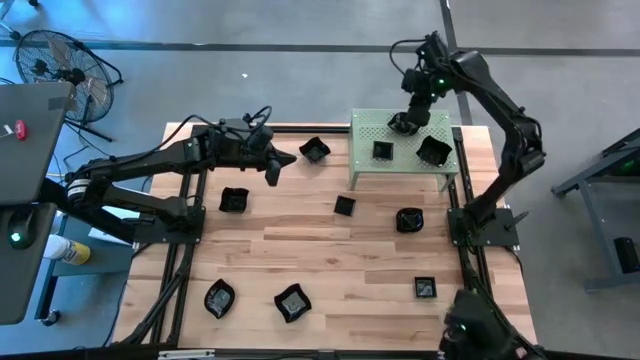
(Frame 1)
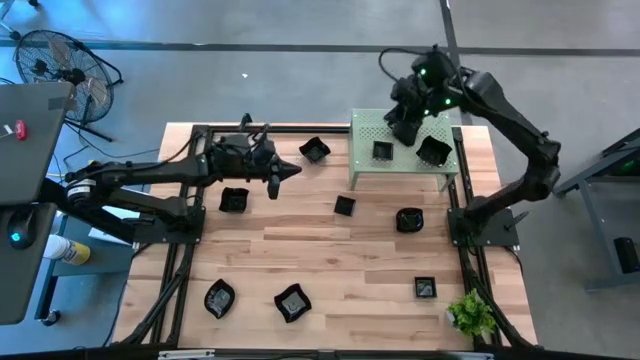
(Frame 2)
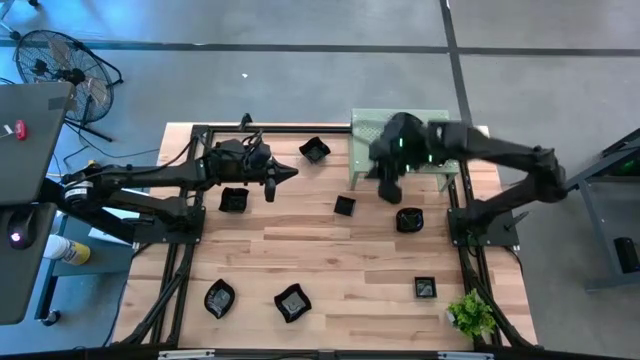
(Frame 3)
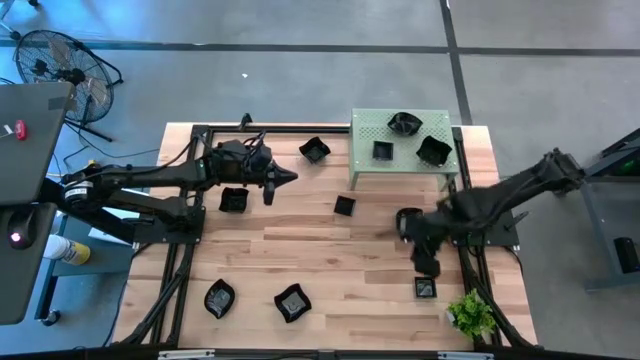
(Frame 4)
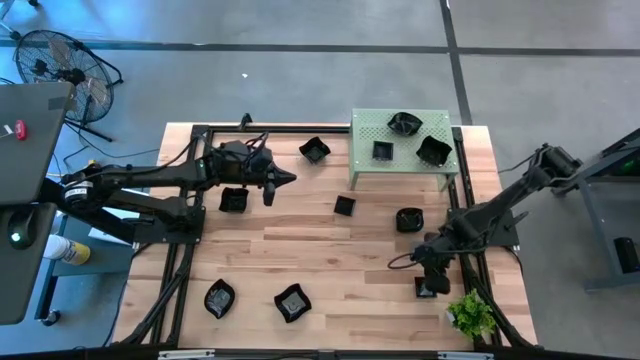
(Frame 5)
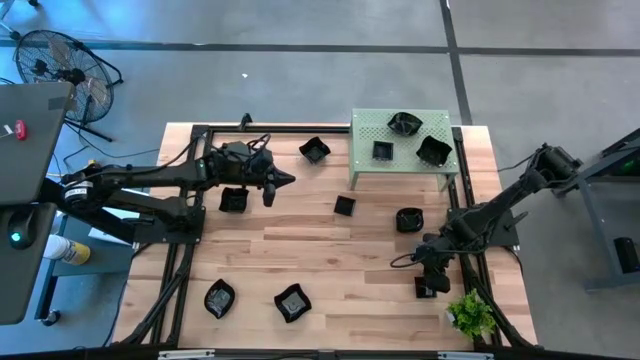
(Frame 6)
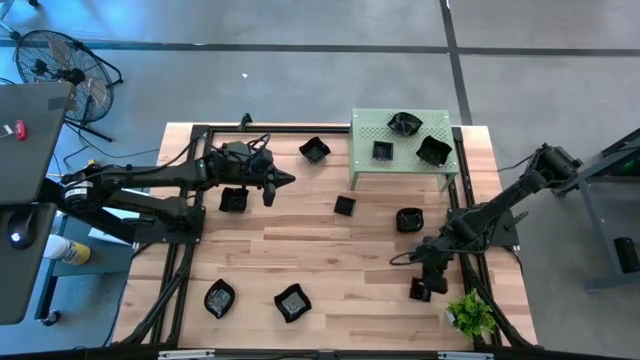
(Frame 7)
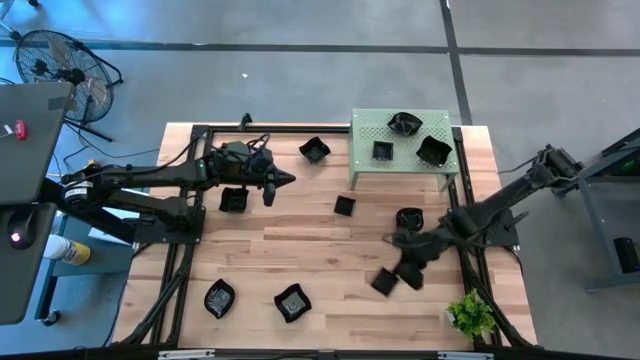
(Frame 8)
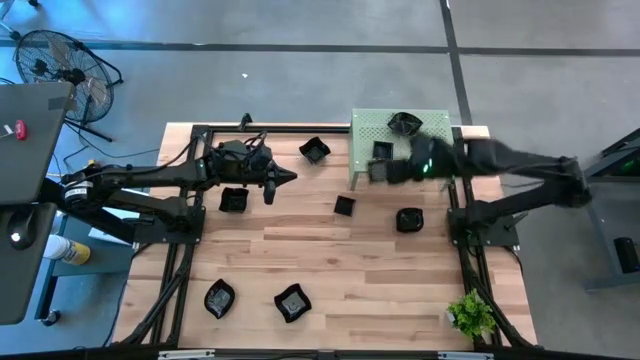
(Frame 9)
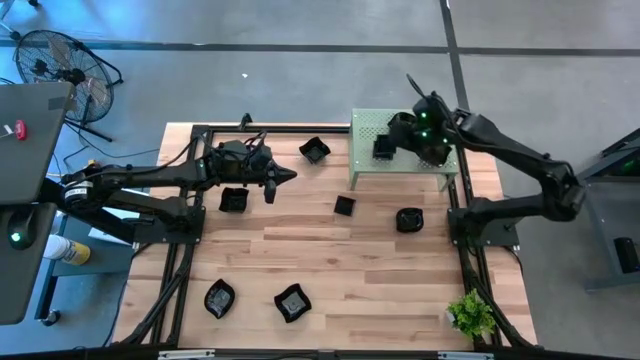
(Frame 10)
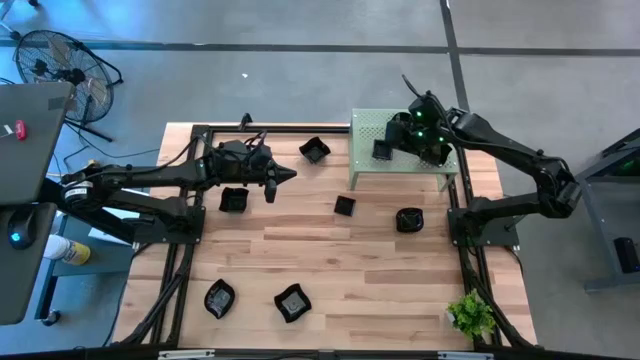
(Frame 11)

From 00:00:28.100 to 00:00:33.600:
Task: Pick & Place Mini shaped plates
Stack the black square plate on top of the black square plate on the shelf

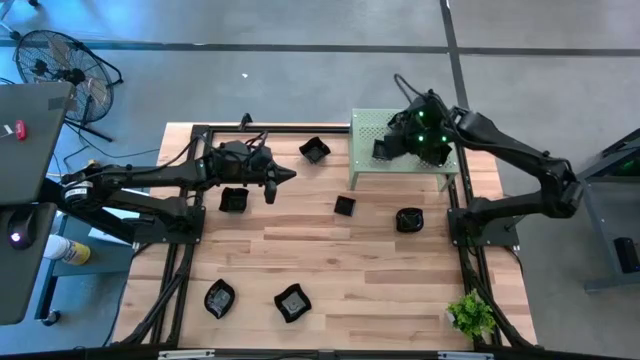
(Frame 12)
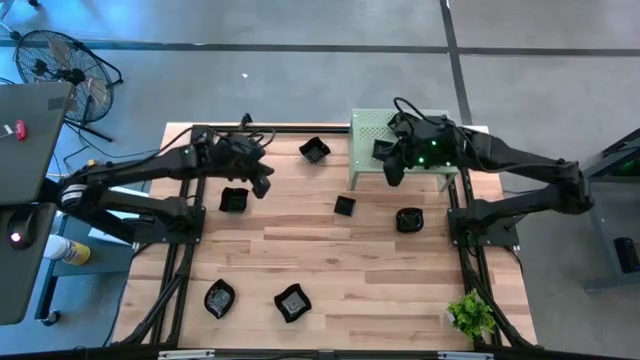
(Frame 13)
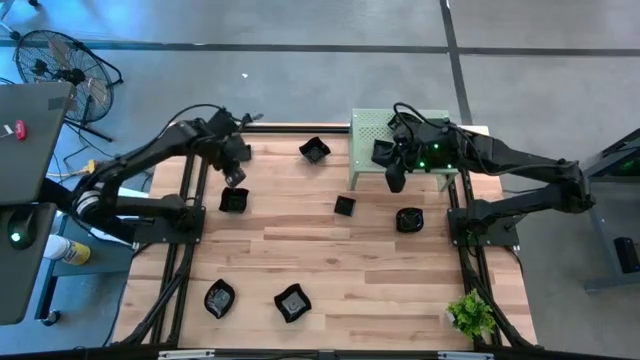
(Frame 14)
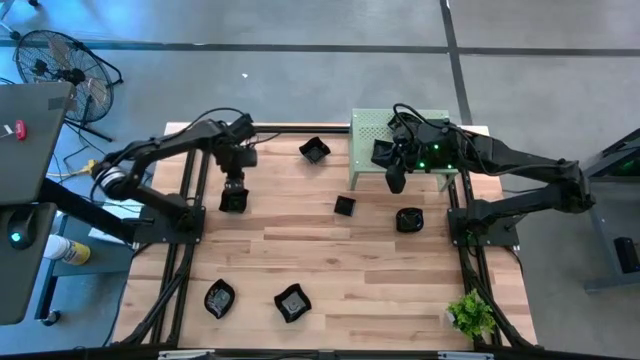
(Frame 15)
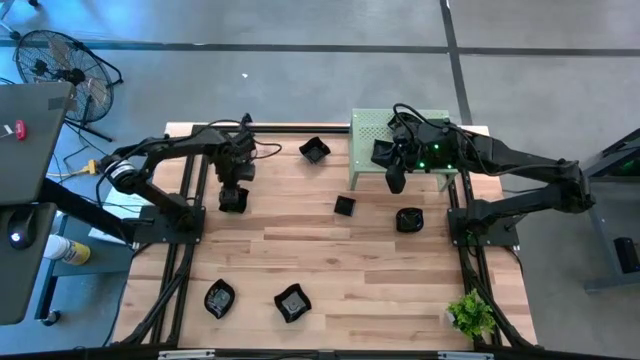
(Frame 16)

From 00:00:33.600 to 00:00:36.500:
Stack the black distorted square plate on top of the black distorted square plate on the shelf

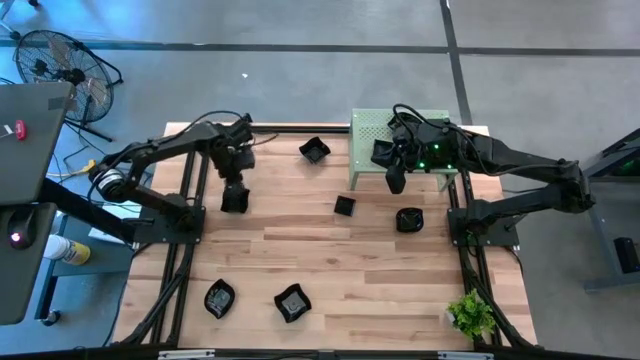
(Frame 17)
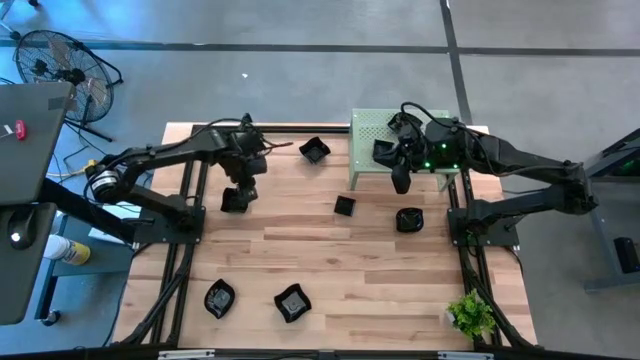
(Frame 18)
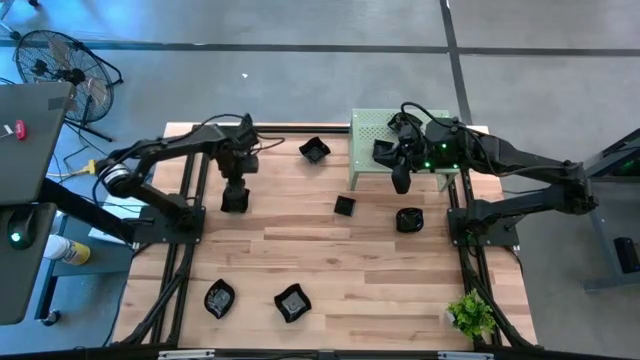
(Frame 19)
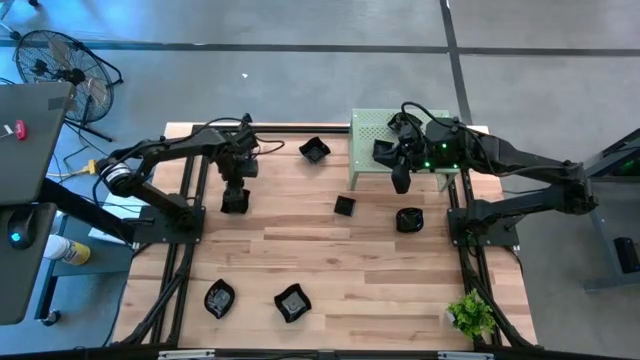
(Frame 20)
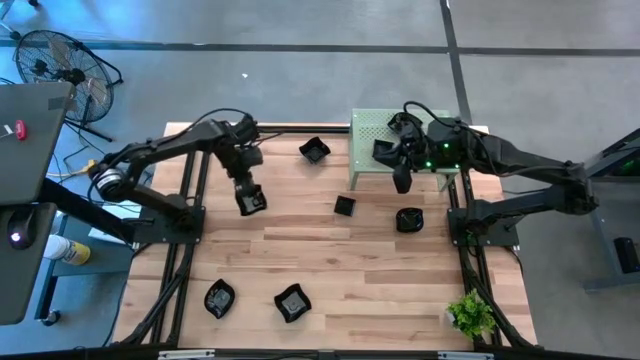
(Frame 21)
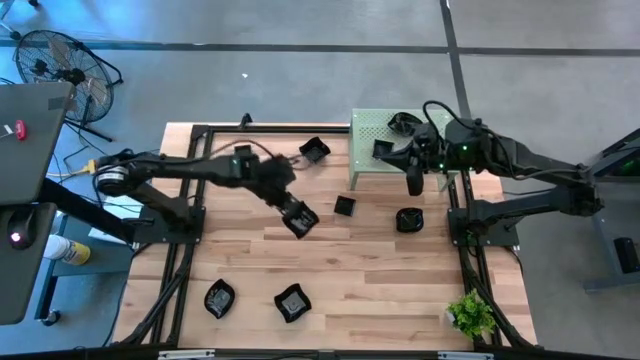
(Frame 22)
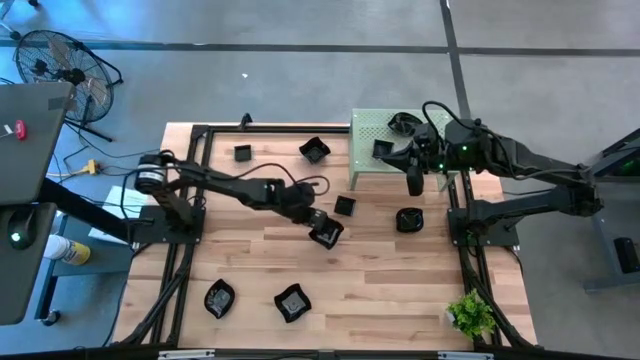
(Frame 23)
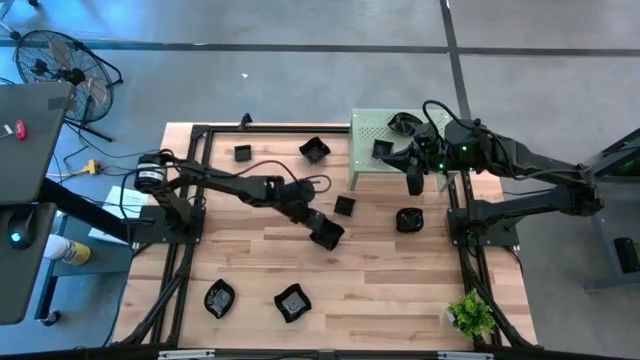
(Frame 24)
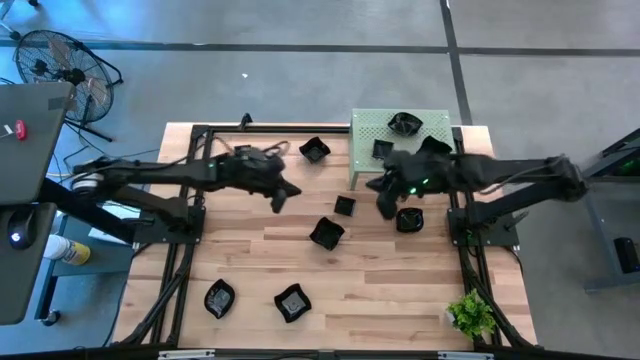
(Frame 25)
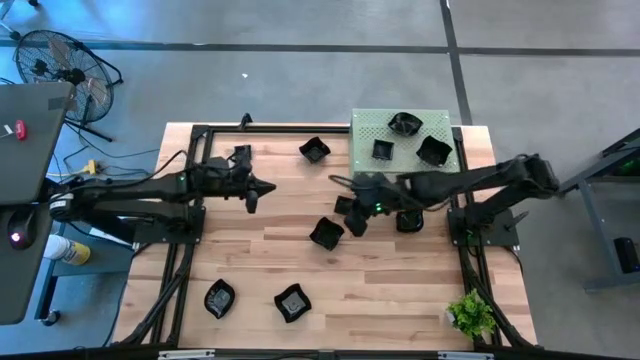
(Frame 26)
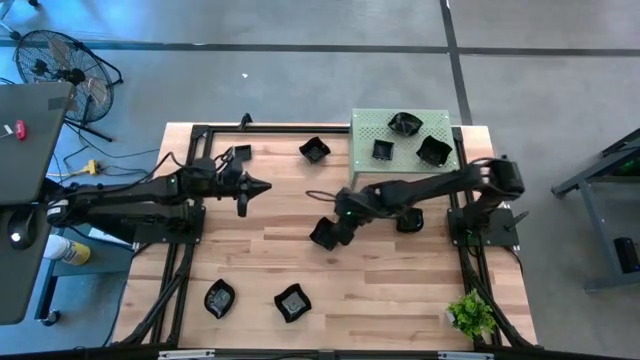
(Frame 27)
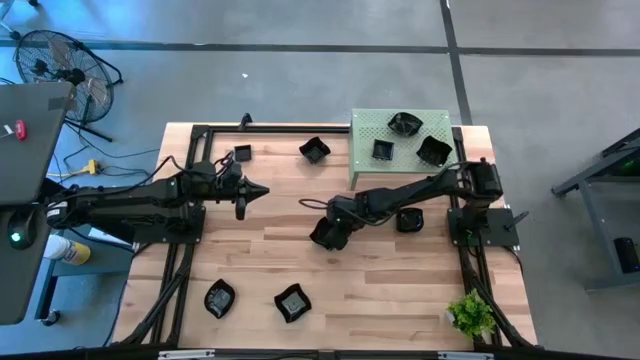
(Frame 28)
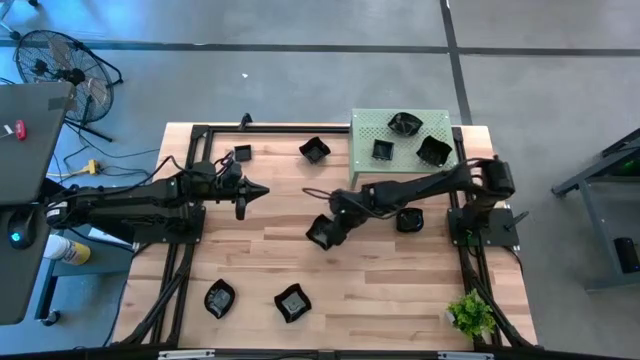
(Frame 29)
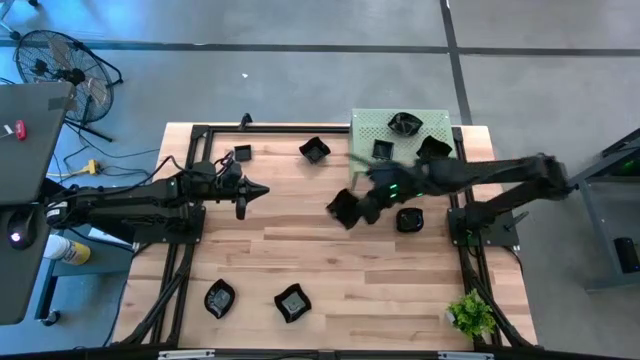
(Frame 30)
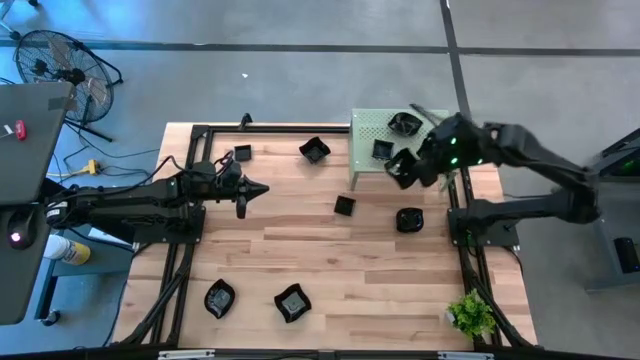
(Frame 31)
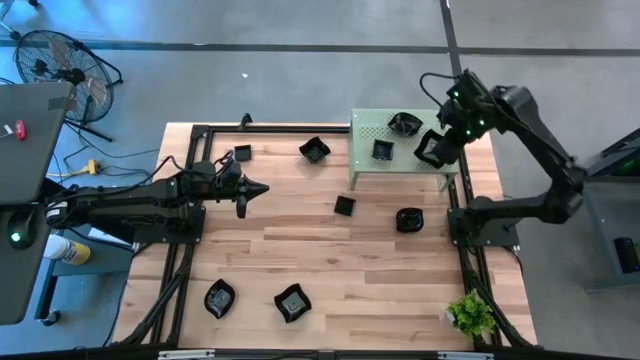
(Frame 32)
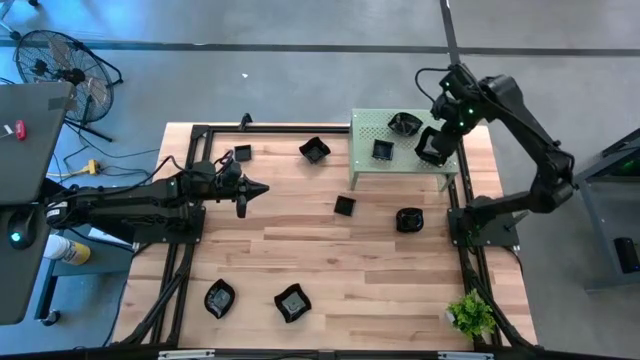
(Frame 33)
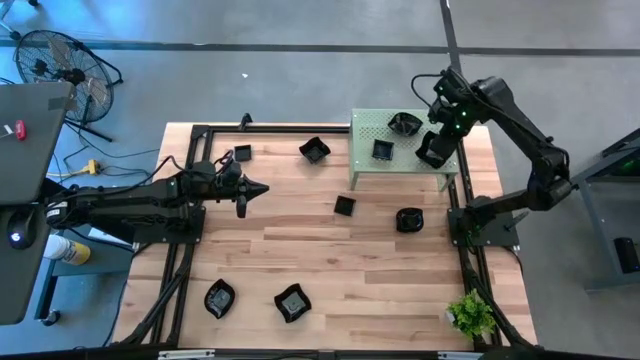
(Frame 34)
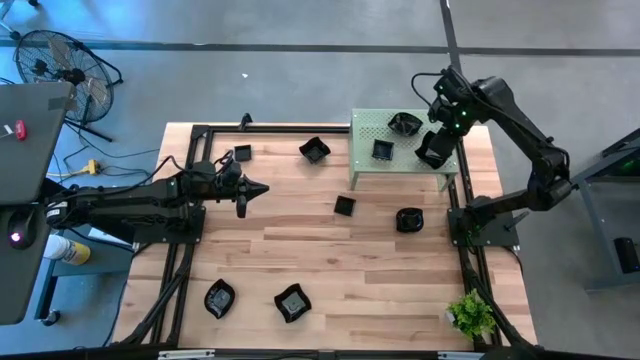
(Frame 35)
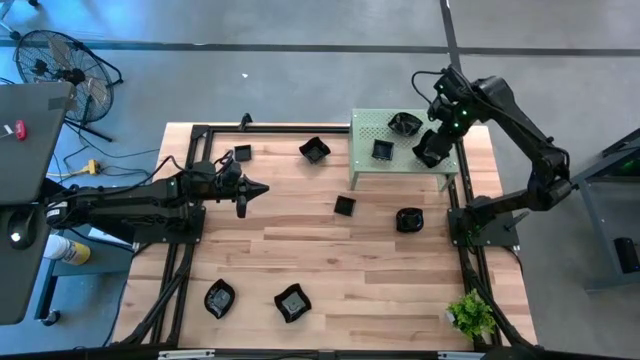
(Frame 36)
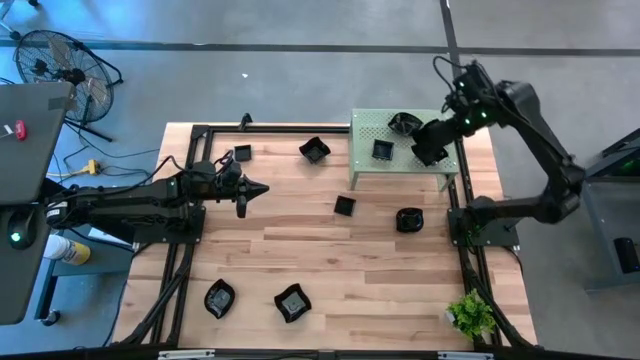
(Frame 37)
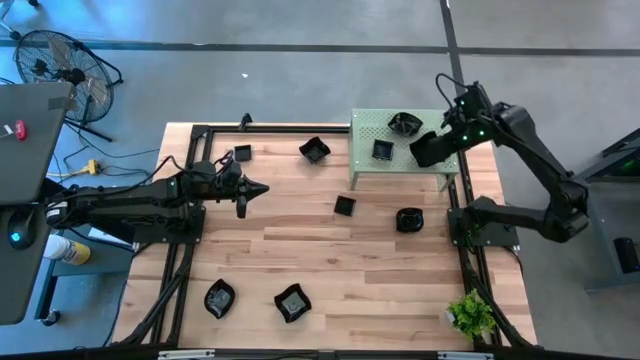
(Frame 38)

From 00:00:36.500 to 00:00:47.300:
Stack the black distorted square plate on top of the black distorted square plate on the shelf

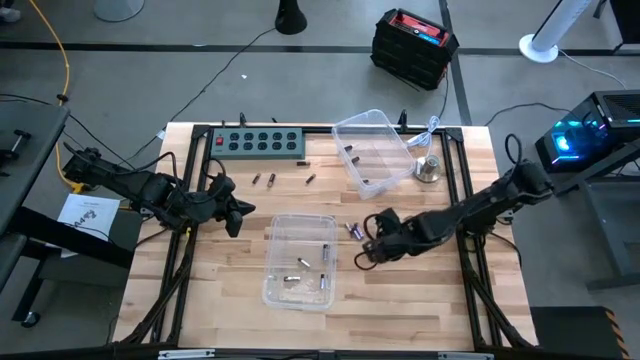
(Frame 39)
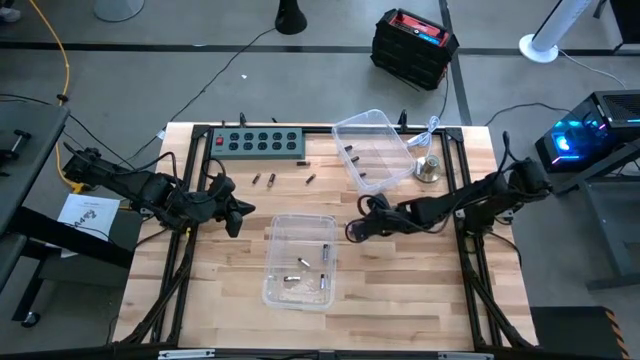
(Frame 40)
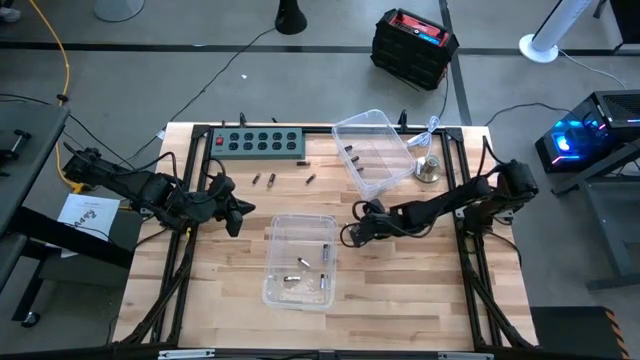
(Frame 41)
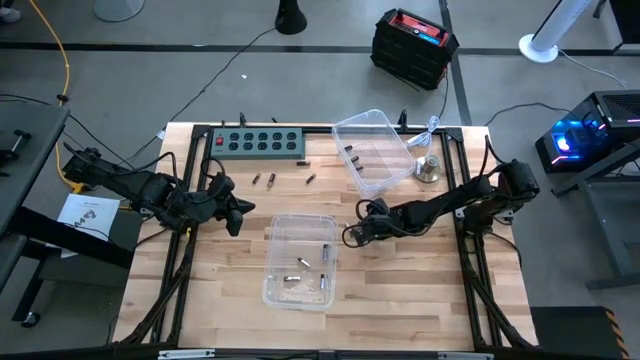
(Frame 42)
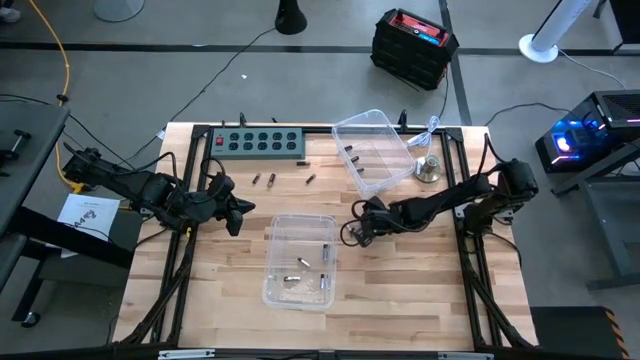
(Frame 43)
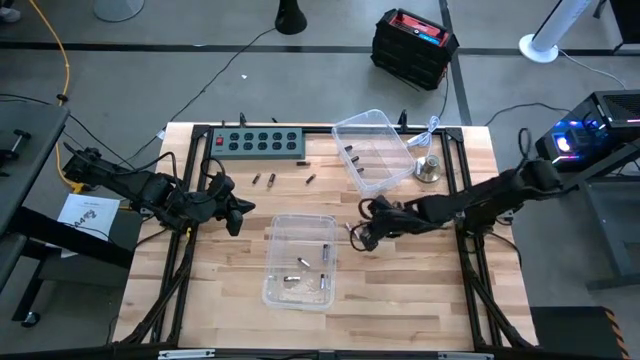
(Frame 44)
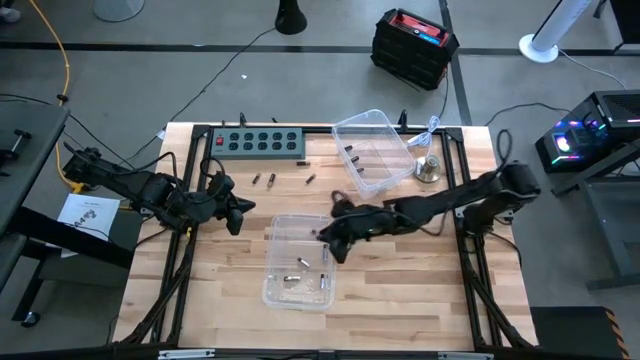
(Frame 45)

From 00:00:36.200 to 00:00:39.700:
Task: Sort batteries
Put the silver battery into the left transparent bin
